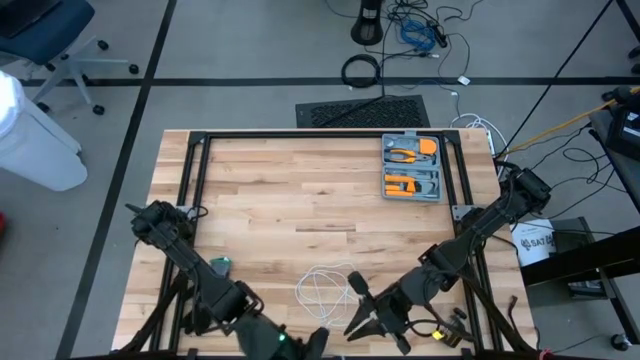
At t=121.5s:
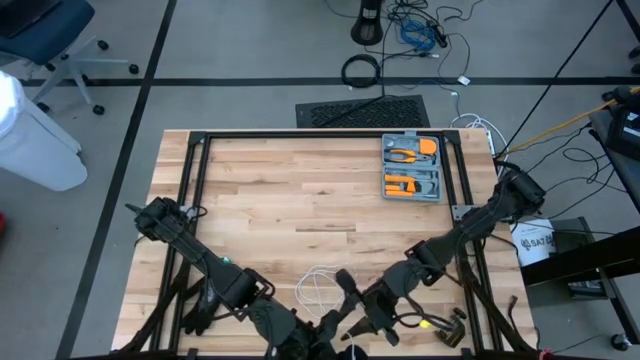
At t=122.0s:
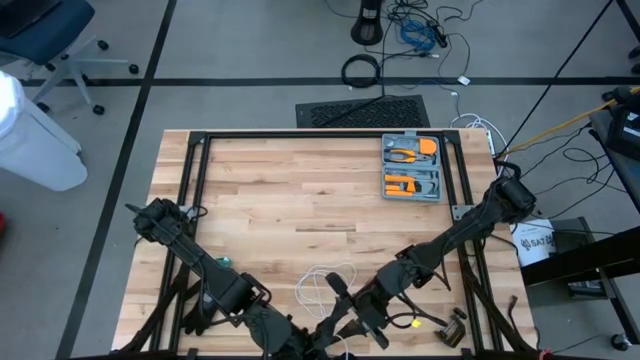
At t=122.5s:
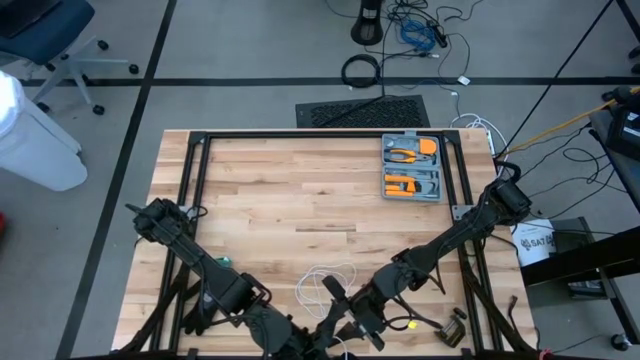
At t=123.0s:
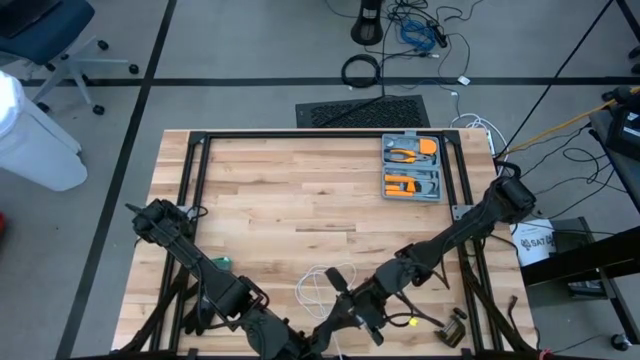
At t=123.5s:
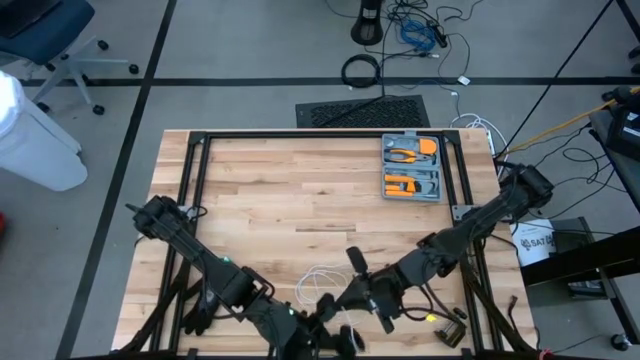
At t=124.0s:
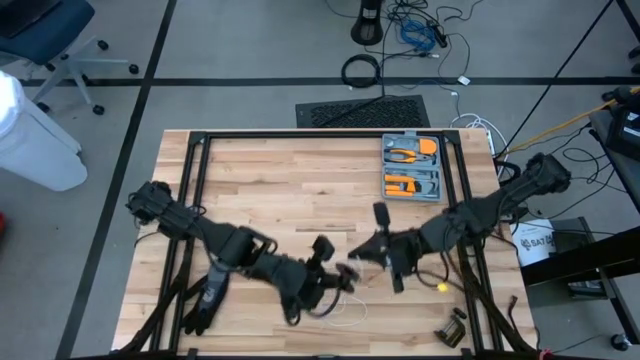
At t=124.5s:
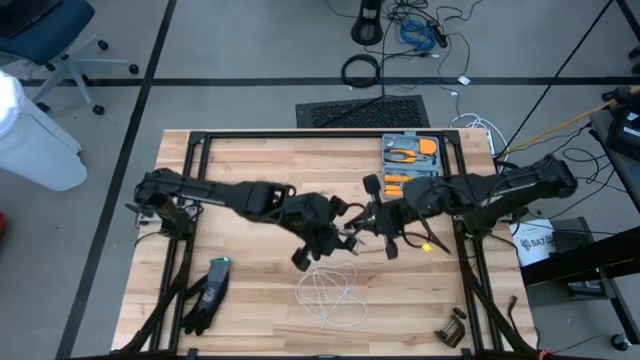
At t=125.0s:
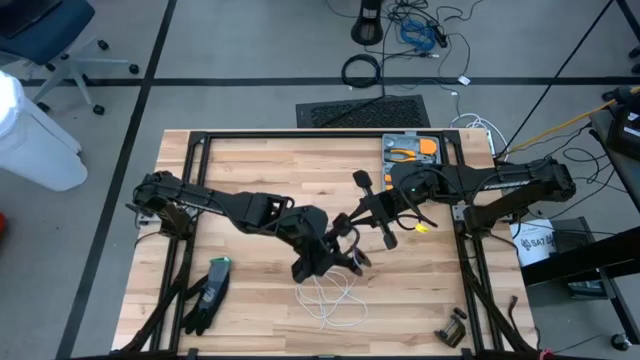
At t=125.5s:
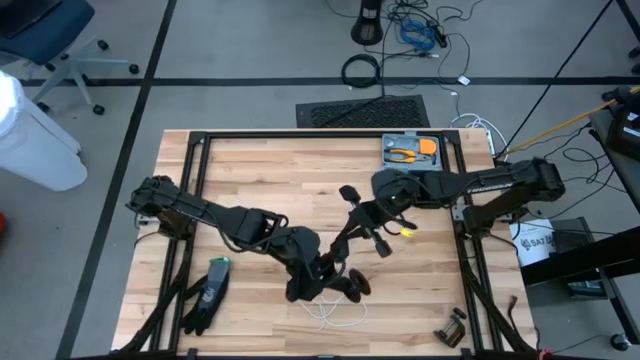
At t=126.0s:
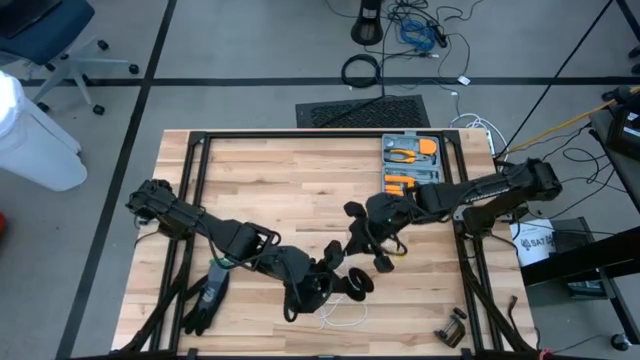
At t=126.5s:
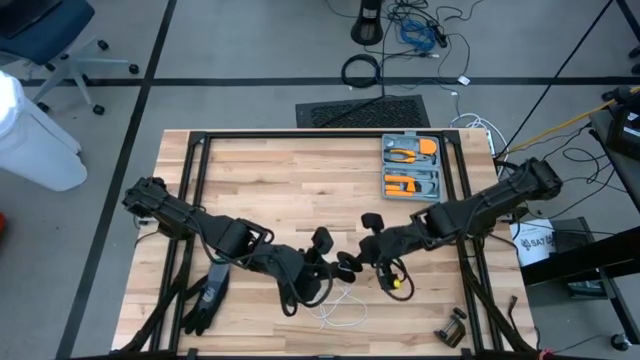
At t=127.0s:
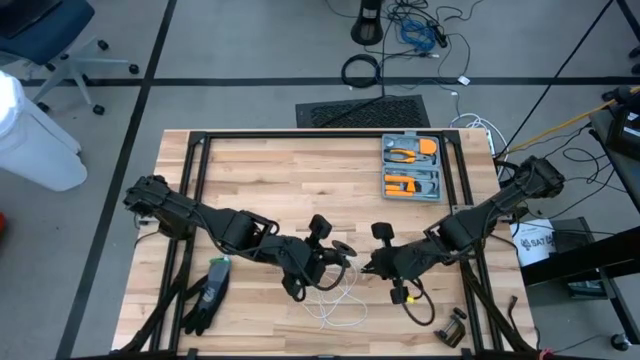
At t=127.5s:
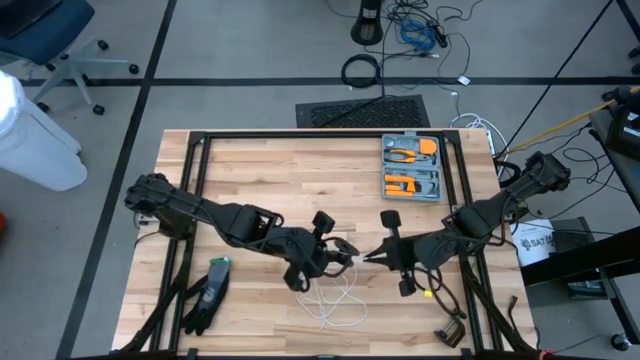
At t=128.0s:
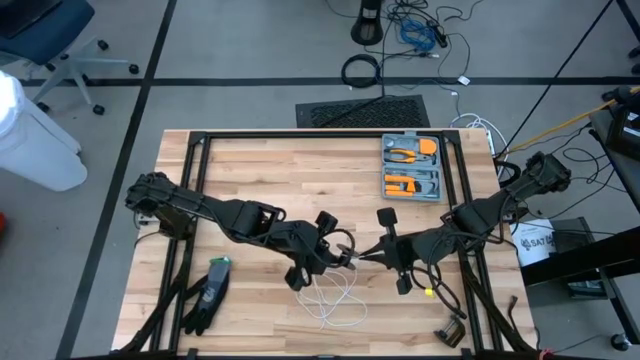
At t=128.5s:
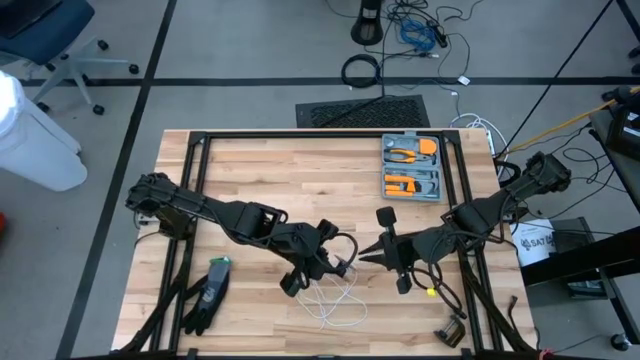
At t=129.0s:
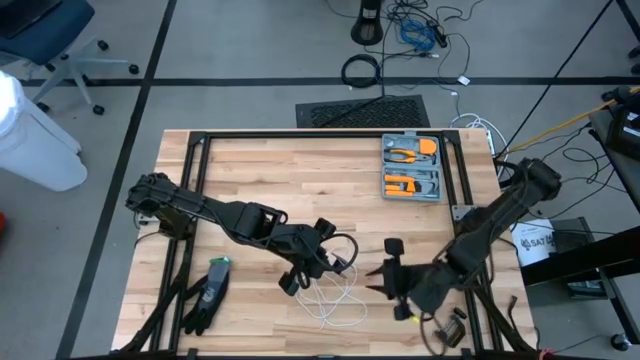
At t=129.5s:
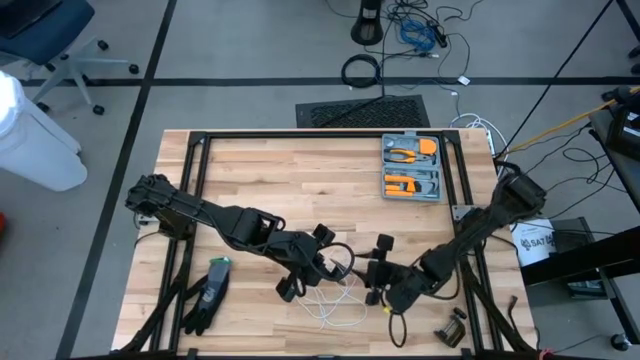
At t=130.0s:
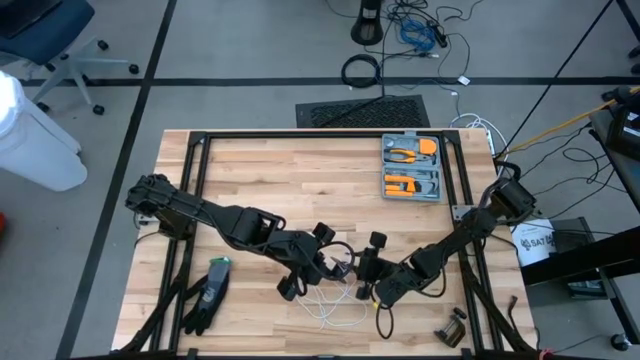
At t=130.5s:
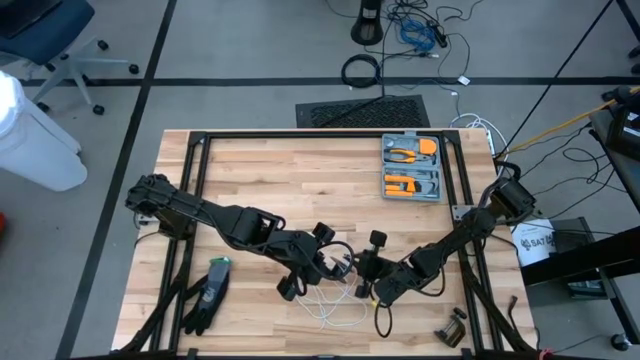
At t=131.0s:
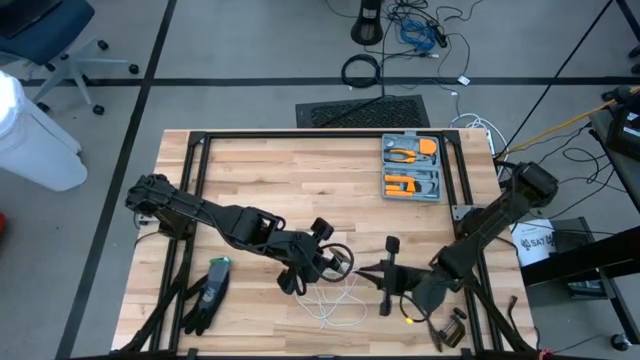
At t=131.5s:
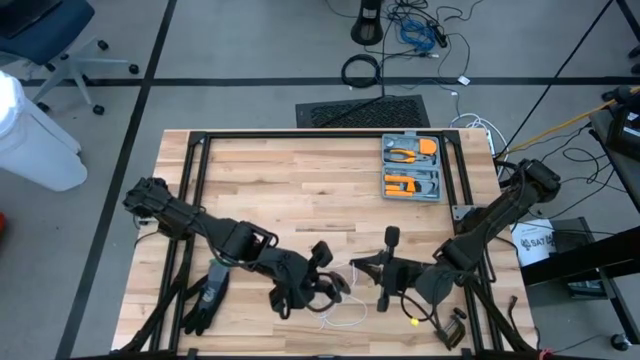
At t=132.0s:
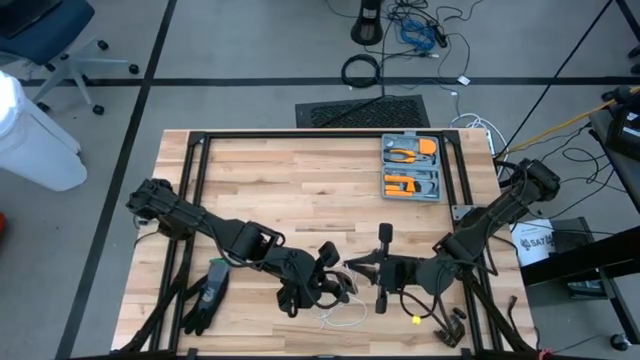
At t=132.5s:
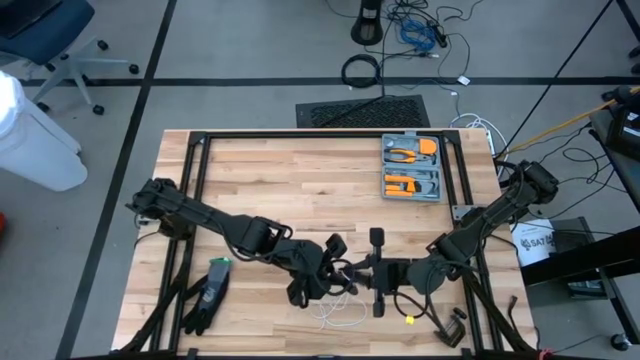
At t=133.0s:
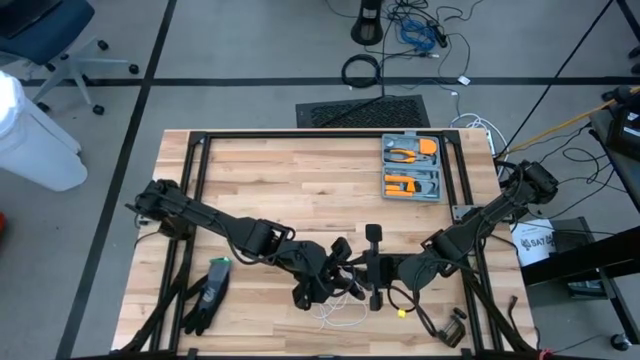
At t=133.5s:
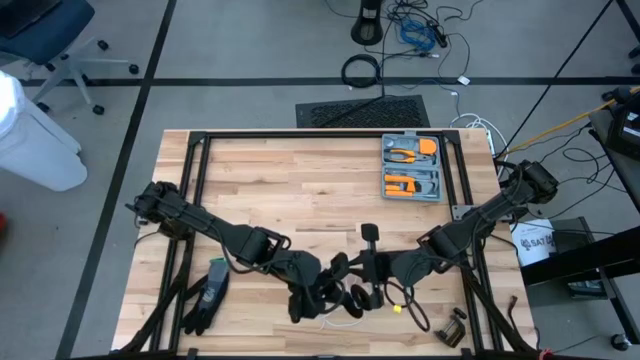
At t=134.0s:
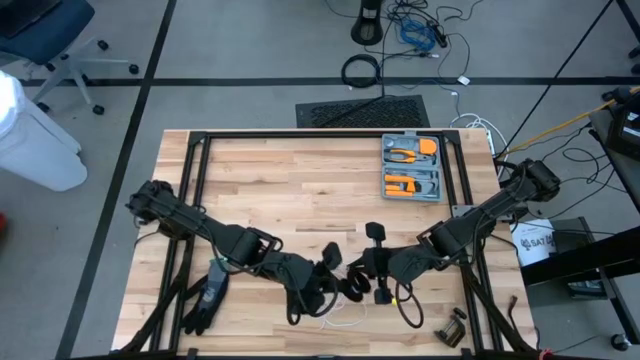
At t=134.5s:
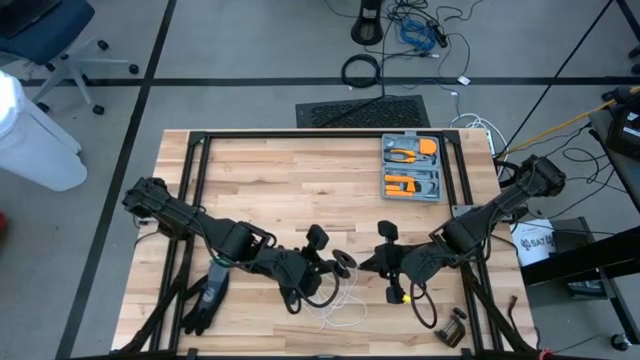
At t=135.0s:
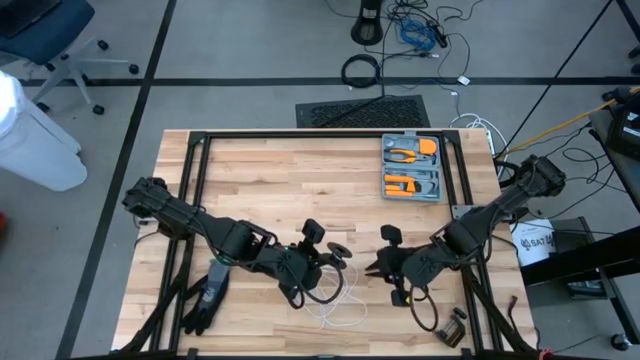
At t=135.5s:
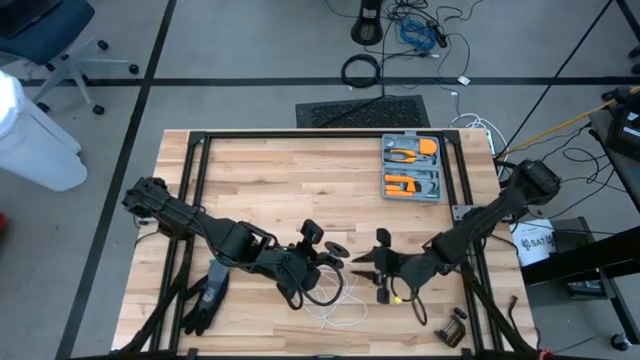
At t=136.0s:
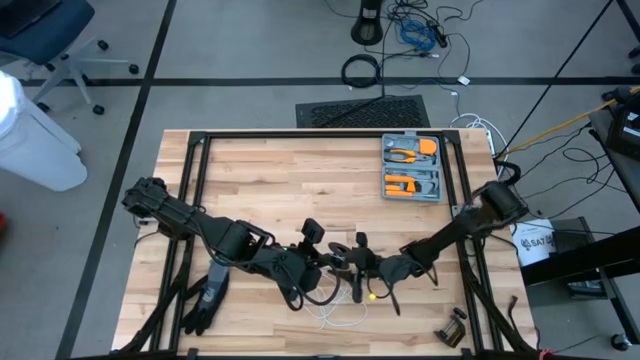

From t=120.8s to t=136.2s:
Task: Coil cords
Coil the white wire onto the spool

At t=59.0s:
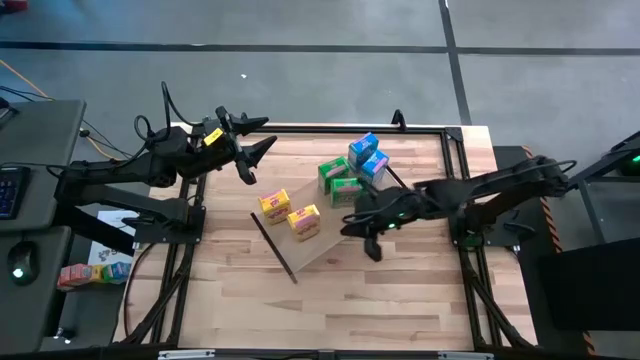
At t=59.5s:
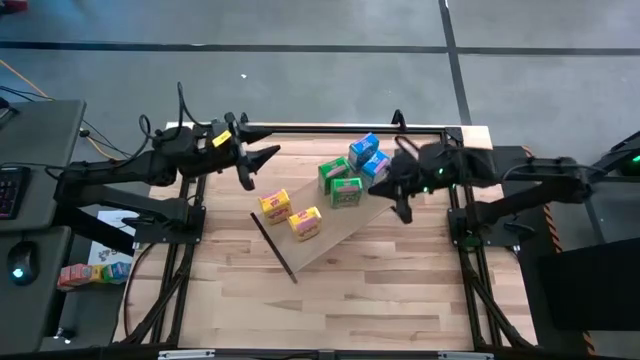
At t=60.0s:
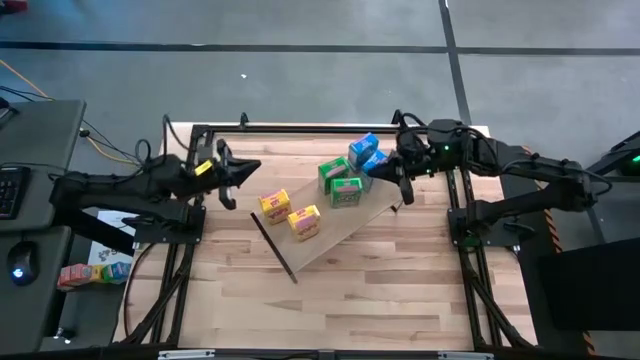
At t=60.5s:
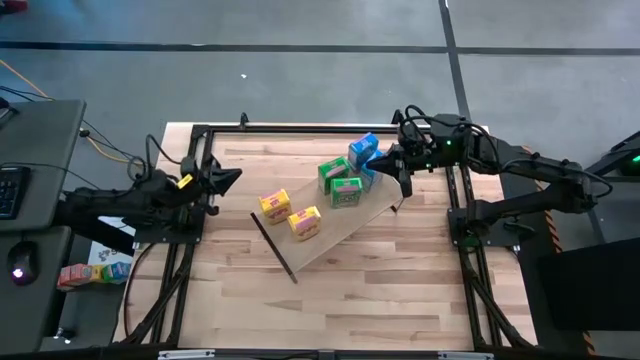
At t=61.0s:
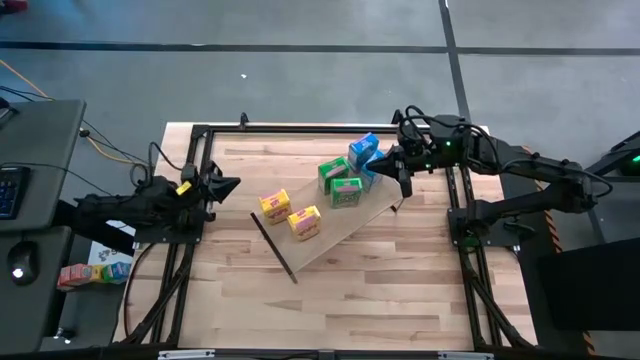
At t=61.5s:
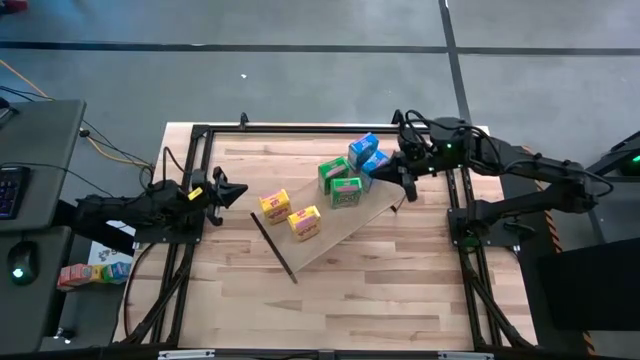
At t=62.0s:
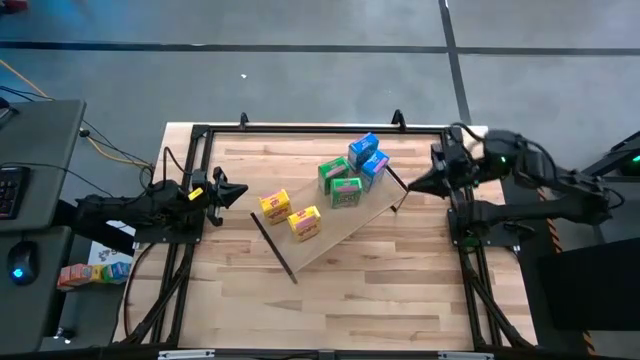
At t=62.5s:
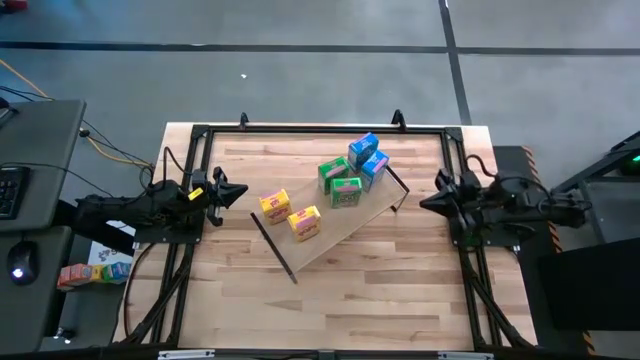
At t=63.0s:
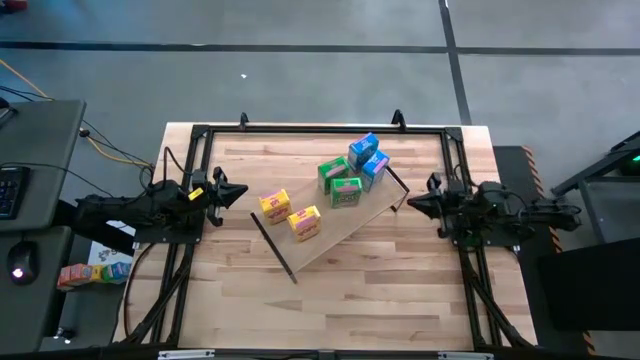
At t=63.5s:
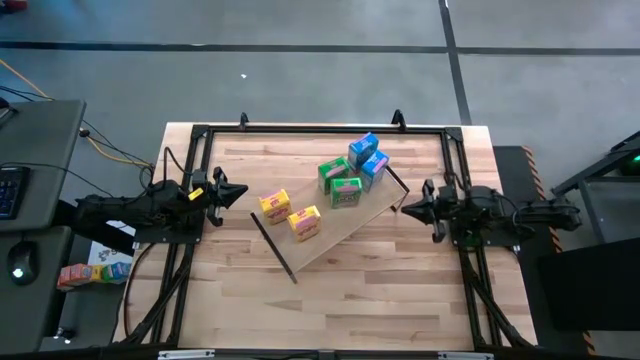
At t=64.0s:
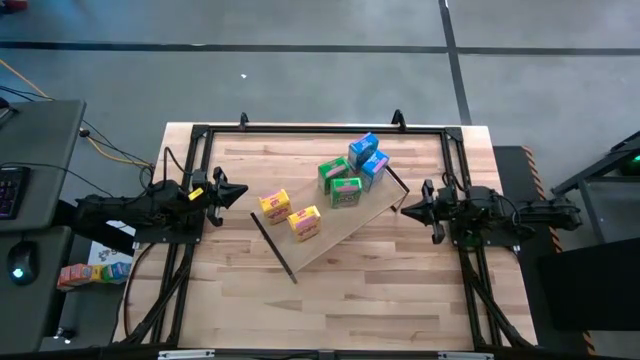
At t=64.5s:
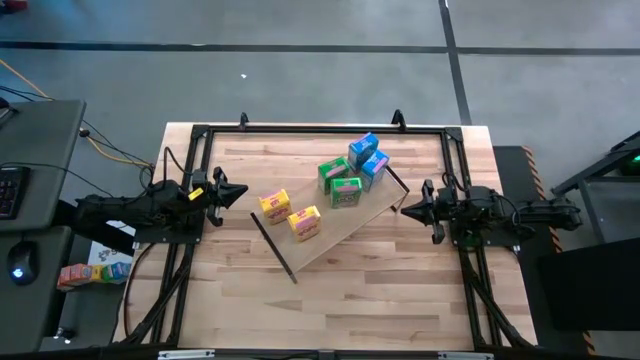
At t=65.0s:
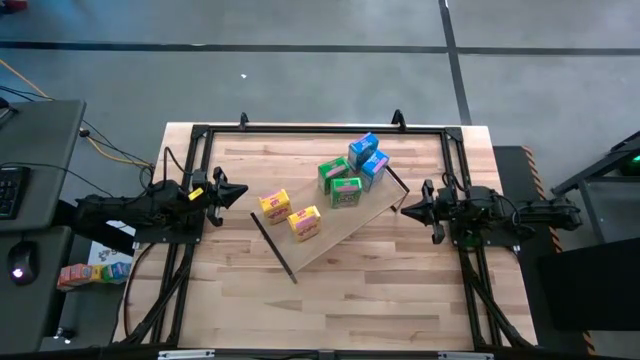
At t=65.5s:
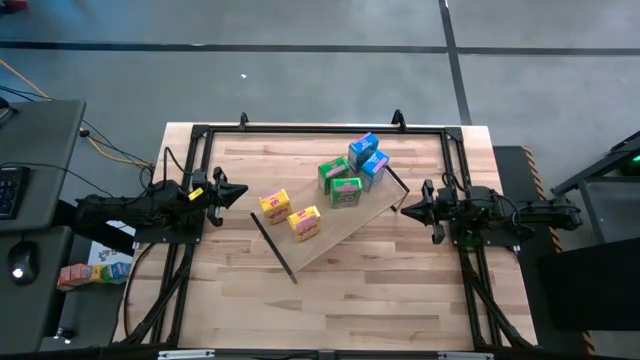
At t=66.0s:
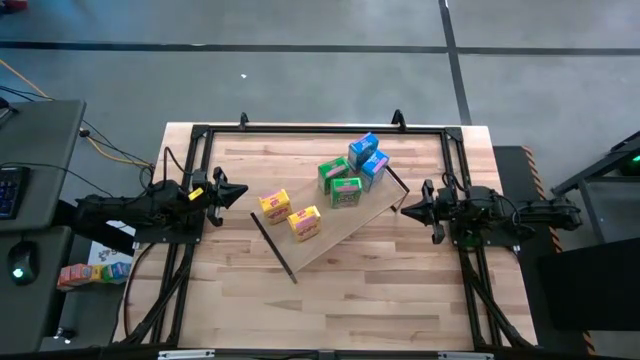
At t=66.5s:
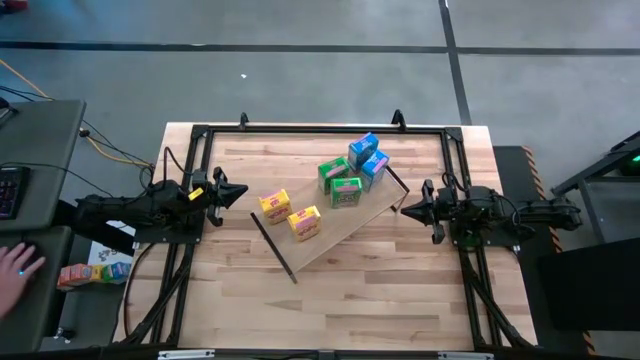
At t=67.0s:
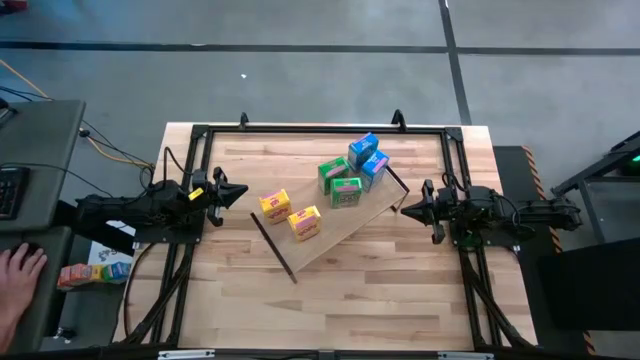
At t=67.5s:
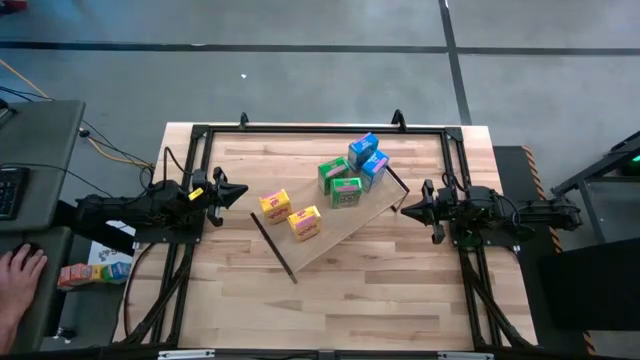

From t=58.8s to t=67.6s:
Task: Stack cereal on shelf
Return to Home Position
